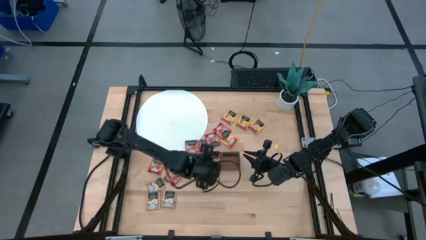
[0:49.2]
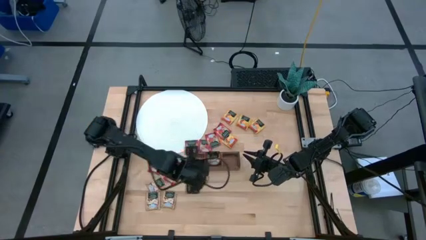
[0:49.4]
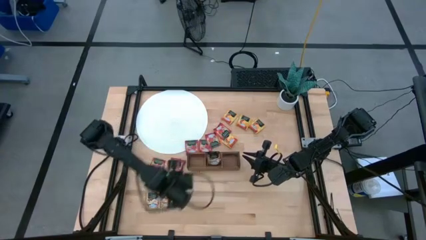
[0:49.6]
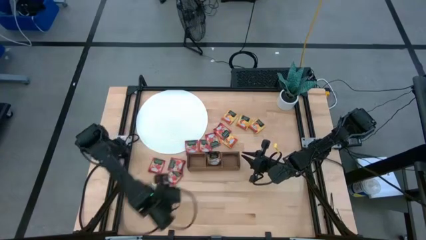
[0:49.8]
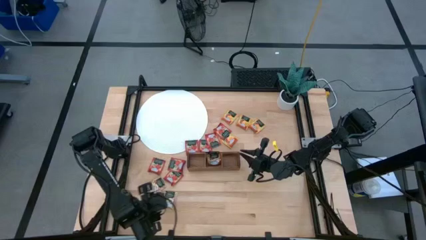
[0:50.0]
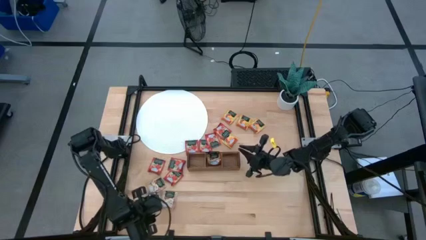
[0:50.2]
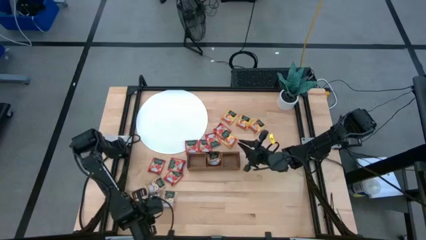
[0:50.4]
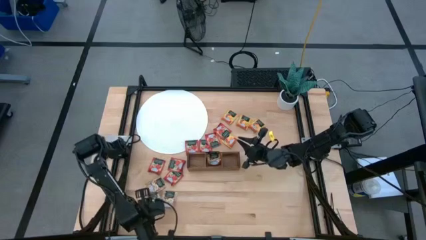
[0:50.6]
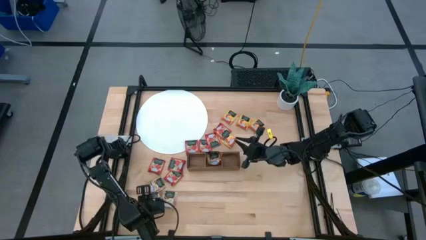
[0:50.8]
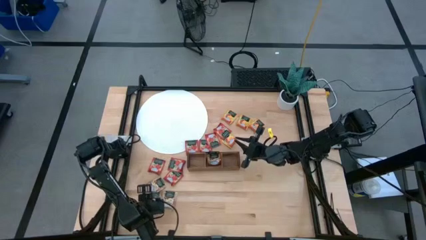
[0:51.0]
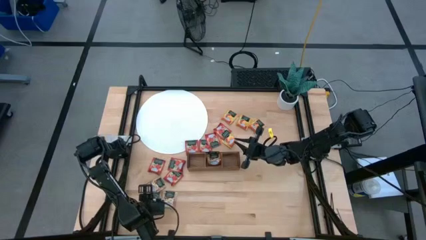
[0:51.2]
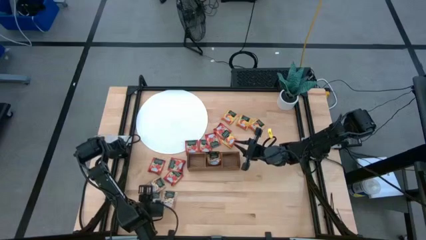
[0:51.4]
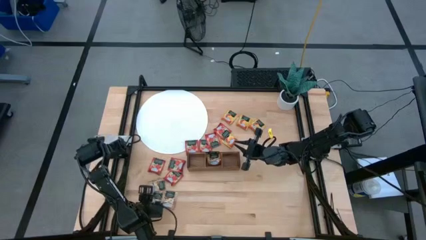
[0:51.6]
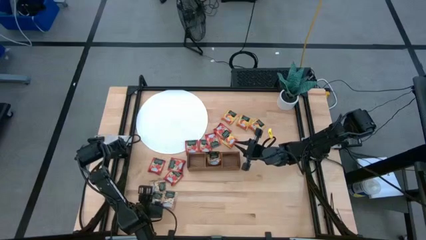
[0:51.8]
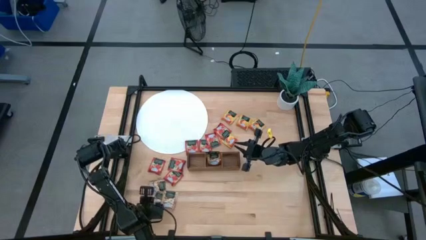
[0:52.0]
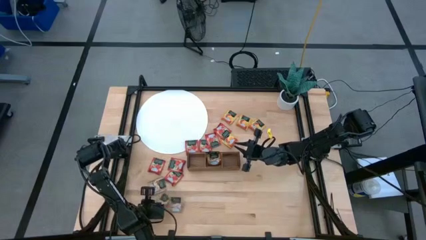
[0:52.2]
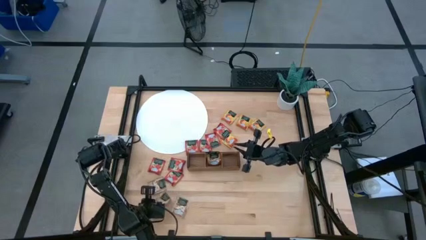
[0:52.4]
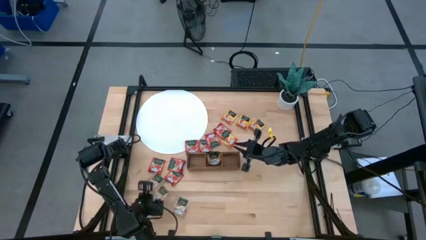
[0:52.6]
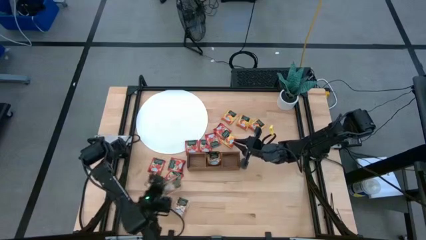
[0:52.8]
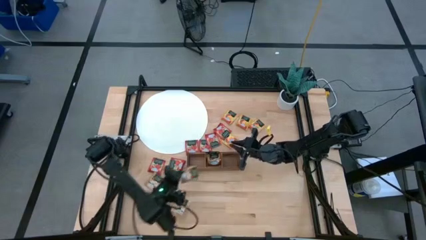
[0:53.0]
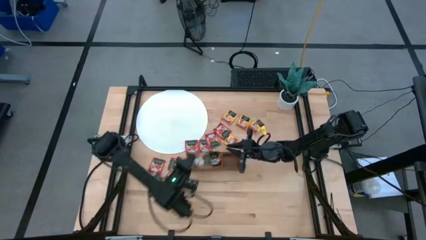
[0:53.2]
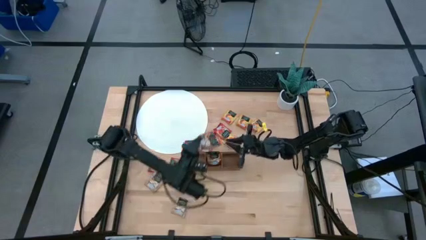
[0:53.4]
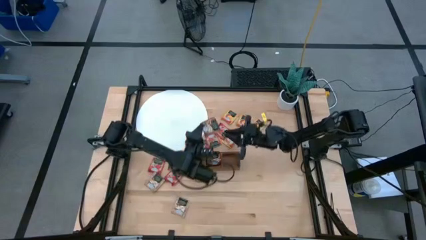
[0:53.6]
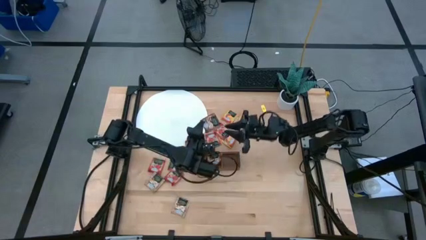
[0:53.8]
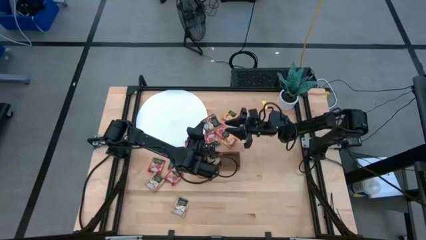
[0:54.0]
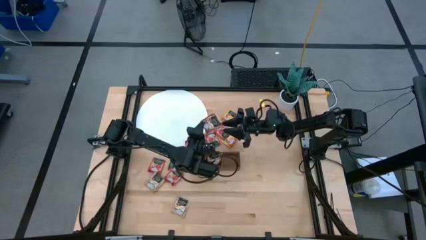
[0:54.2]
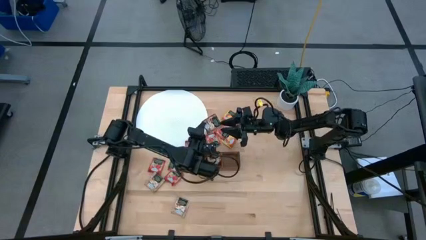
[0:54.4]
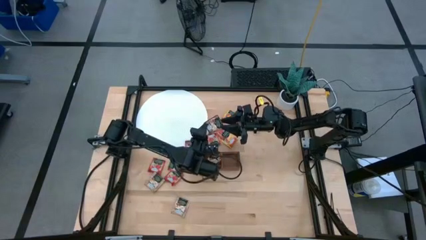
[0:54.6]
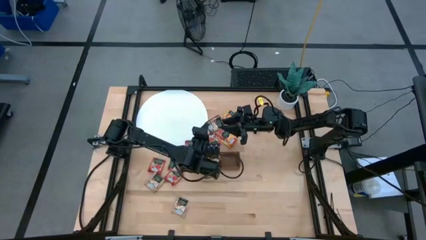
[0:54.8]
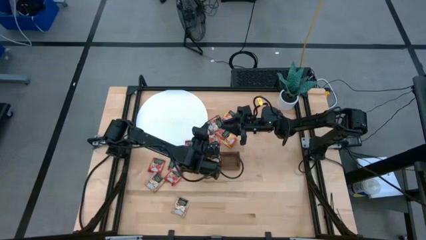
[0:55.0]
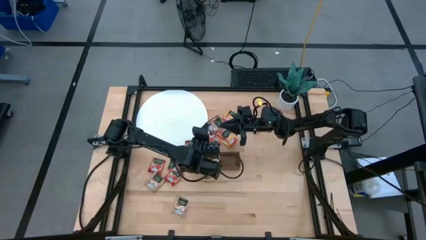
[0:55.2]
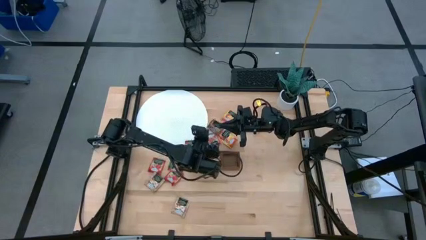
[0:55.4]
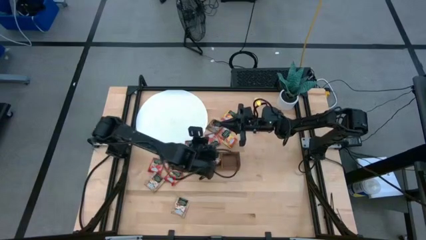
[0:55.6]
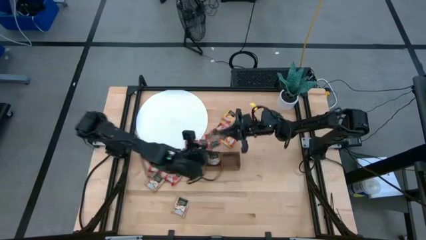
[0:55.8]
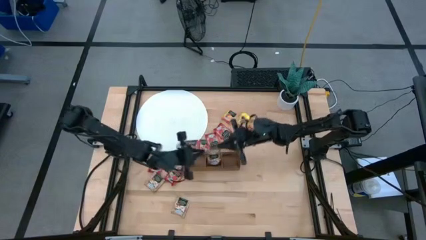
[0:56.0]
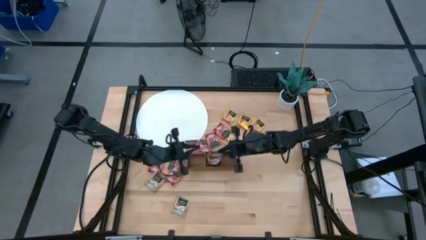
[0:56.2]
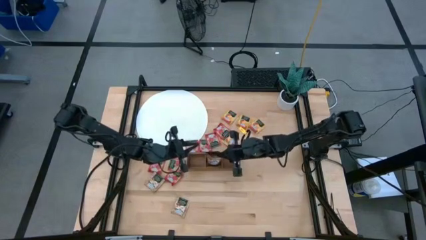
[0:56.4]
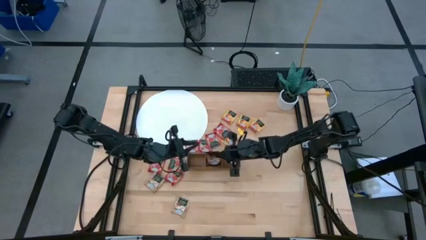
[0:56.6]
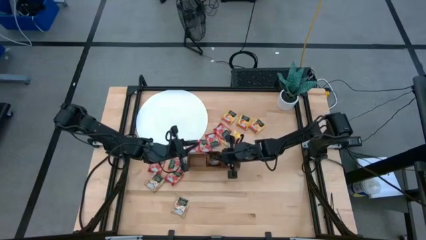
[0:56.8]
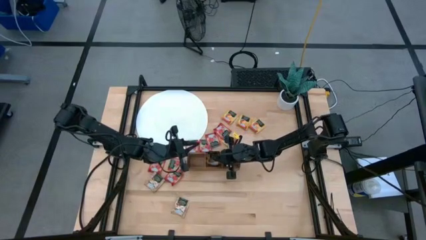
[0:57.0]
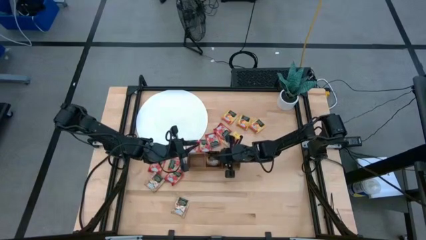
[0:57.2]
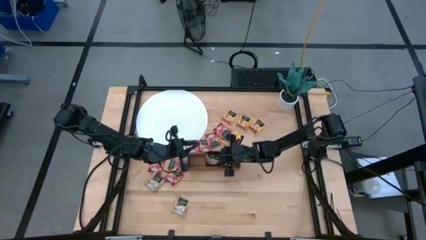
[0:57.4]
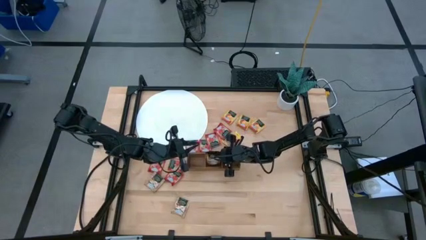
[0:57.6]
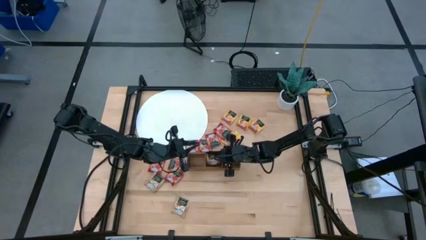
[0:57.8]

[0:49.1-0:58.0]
Task: Pick & Place Tea
Put the bottom left brown tea bag into the middle section of the wooden organizer

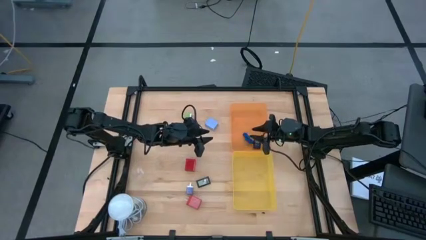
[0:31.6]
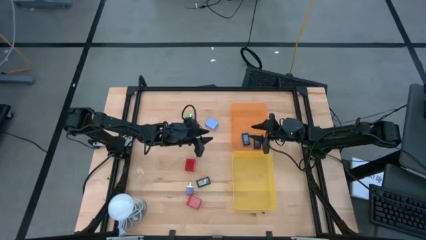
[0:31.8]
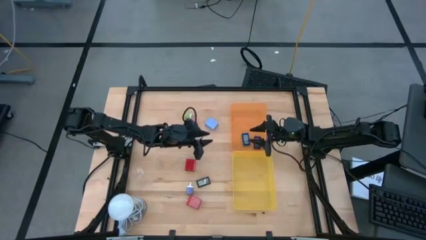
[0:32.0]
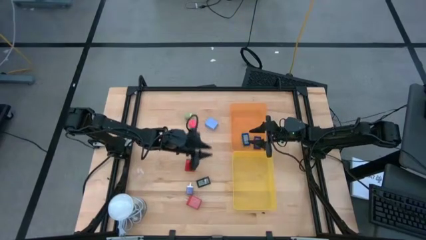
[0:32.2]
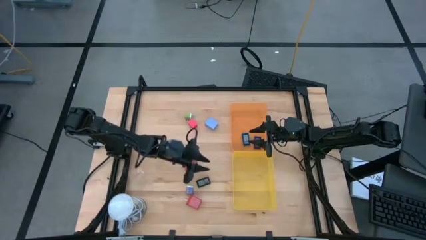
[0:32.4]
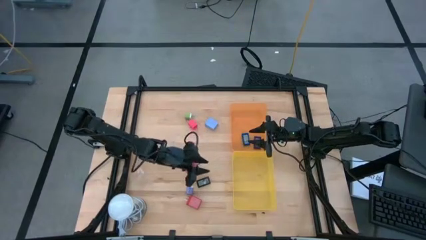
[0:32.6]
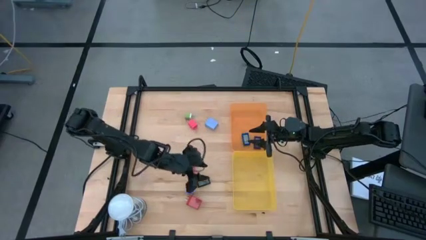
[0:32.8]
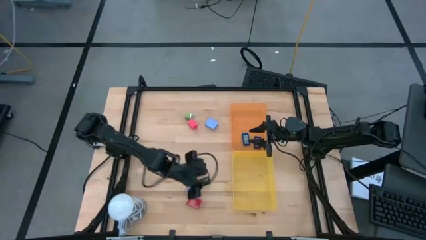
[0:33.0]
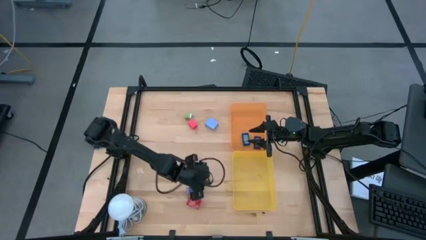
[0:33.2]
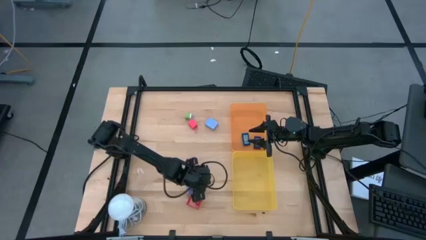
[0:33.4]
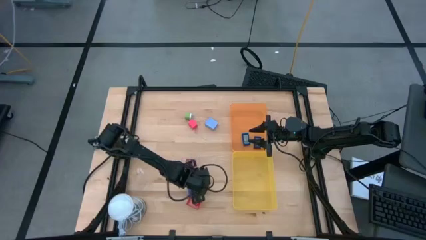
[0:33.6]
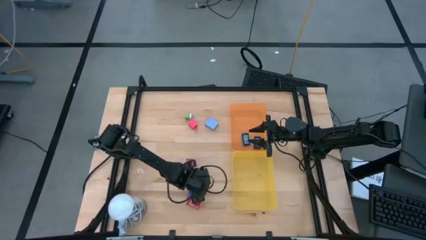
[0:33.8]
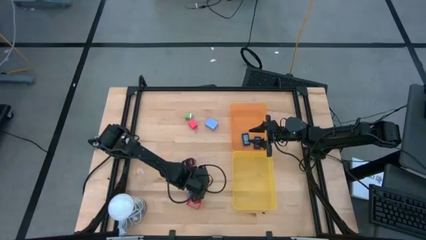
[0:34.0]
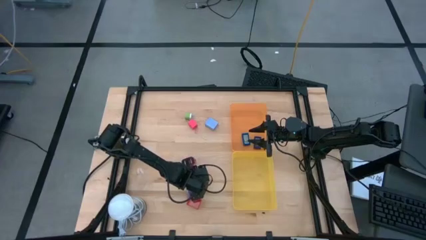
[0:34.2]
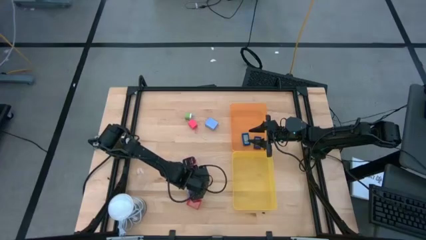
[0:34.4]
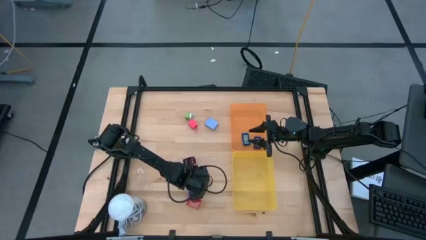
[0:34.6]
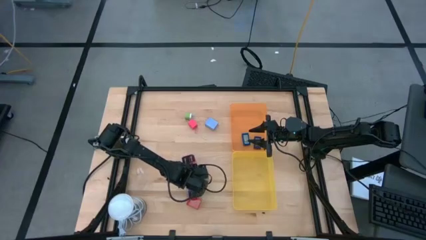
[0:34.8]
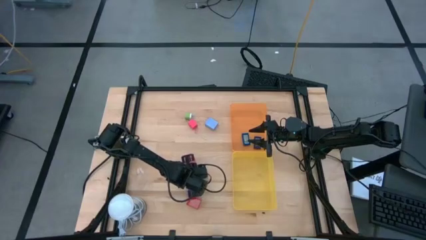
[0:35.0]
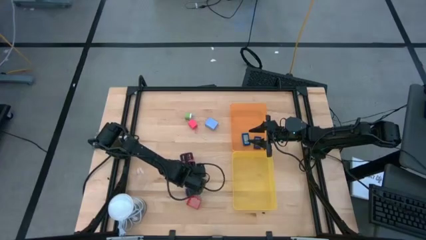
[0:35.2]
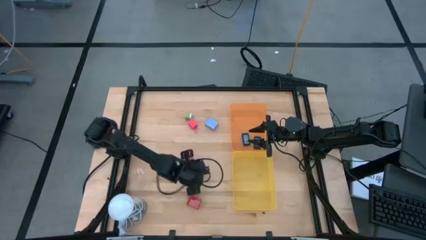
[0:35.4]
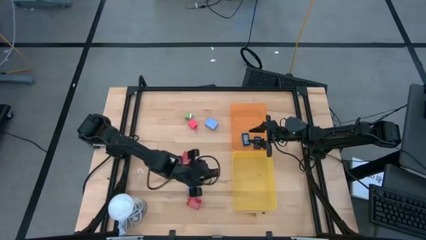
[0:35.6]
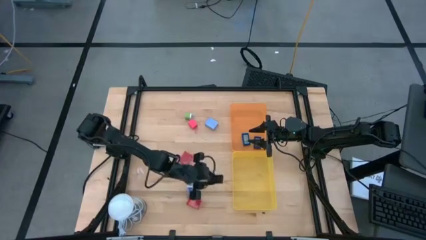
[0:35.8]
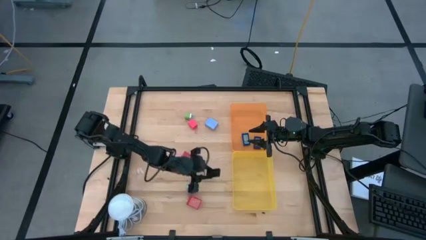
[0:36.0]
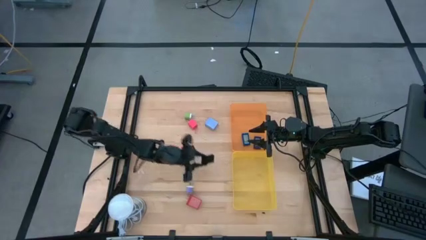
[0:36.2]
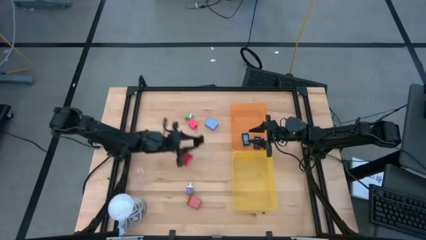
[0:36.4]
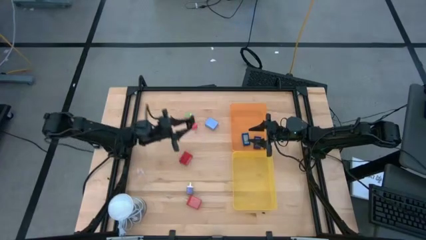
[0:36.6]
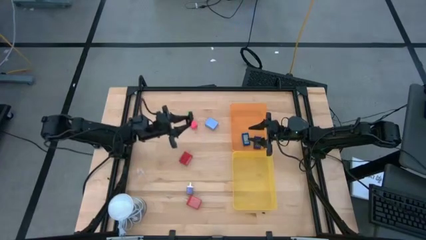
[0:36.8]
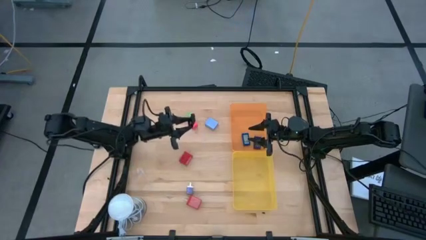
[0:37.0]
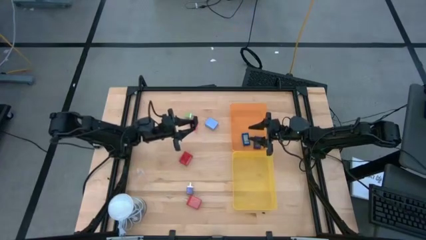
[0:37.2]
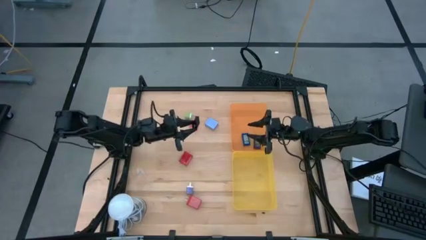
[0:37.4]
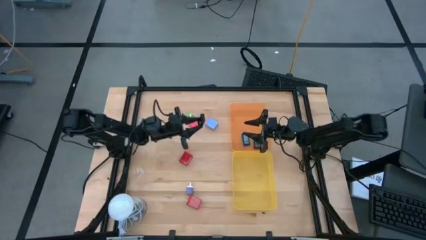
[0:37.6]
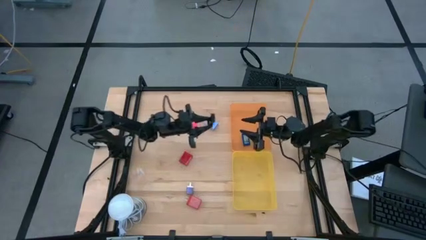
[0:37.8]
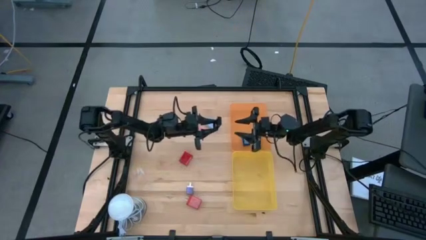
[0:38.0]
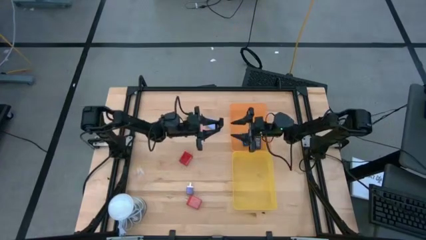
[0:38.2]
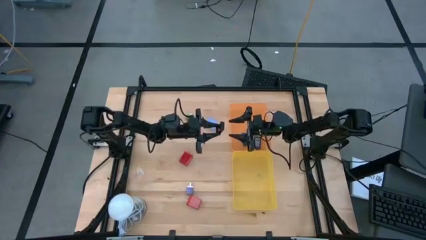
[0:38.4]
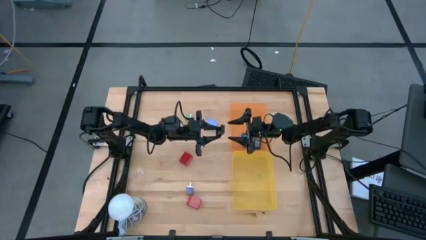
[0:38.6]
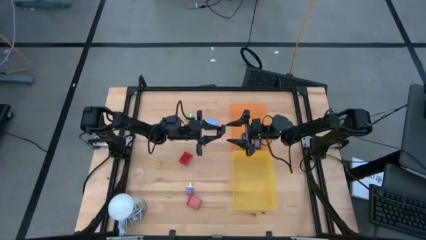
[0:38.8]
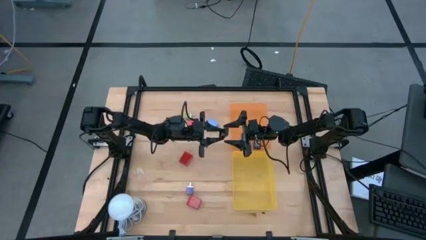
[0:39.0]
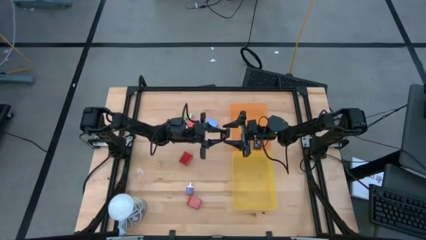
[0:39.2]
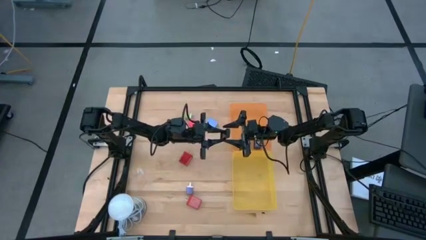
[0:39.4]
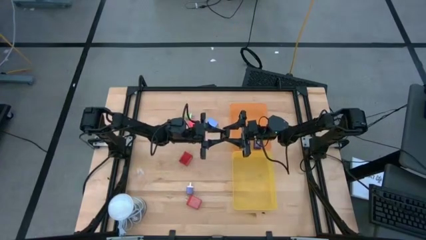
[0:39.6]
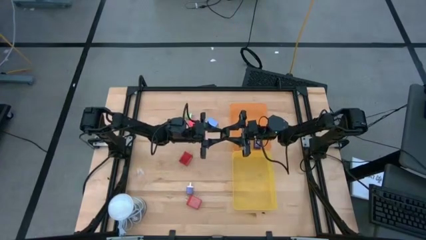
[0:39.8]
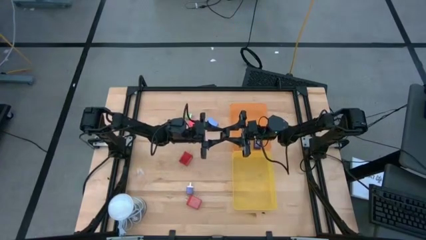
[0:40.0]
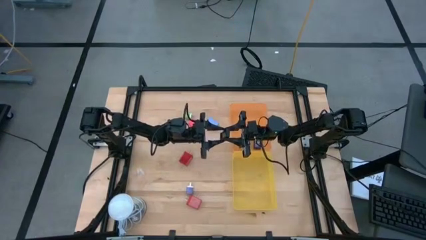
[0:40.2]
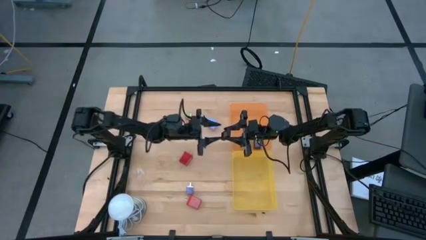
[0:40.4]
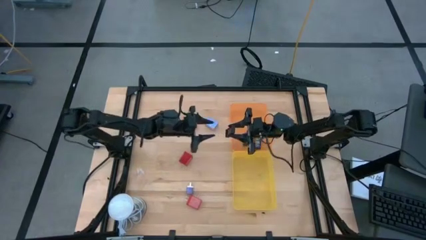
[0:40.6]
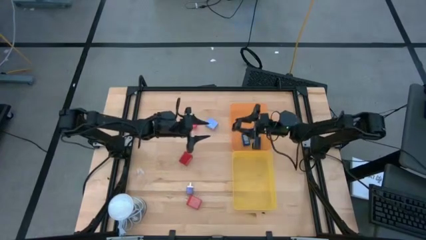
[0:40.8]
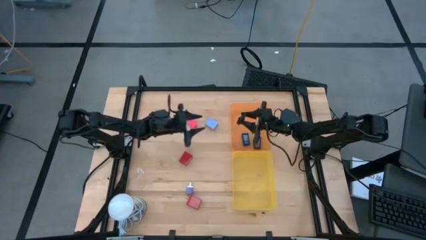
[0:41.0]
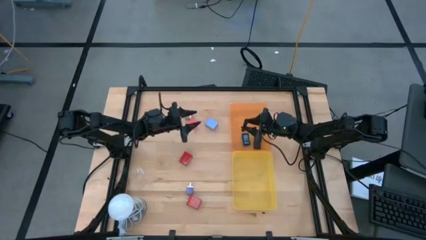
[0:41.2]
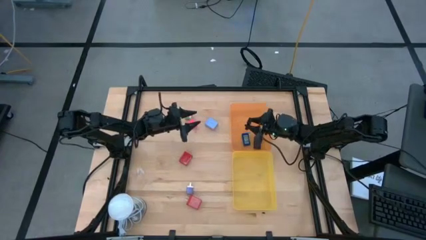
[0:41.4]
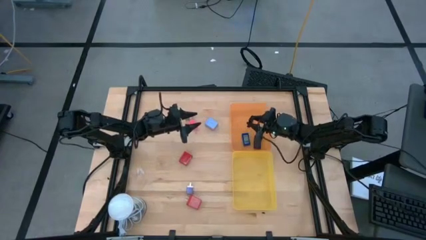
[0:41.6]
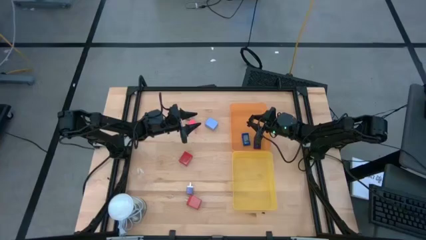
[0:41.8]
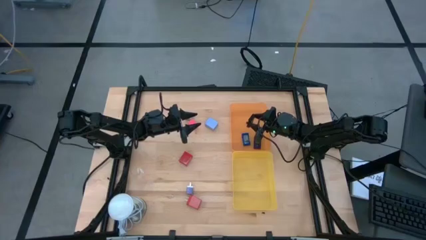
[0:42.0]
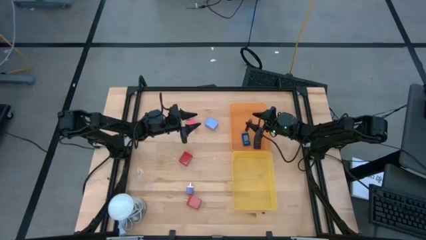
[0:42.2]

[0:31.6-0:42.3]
Task: Pick & Place Office items
Put the black timer into the orange bin
